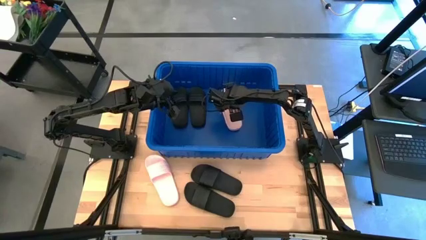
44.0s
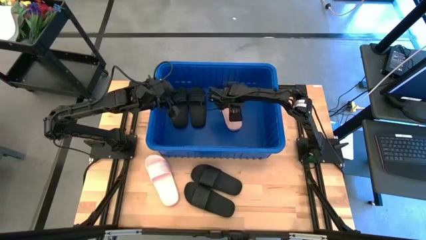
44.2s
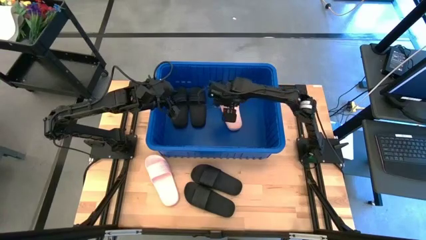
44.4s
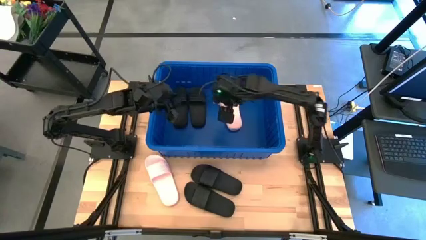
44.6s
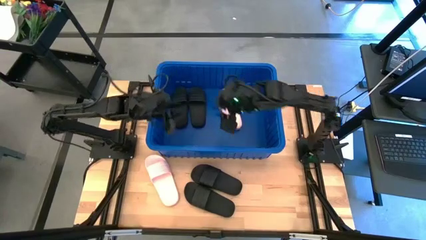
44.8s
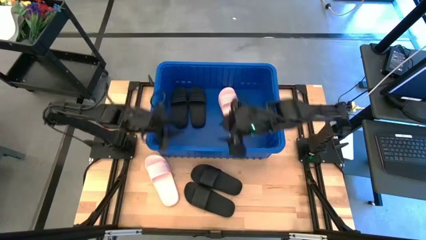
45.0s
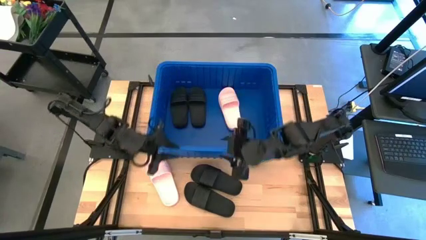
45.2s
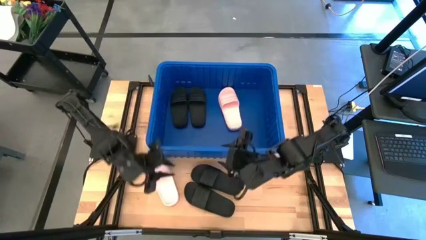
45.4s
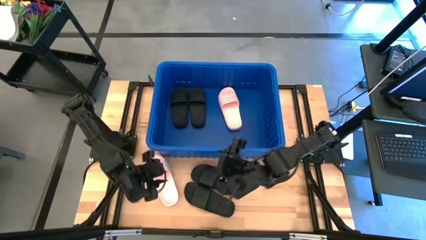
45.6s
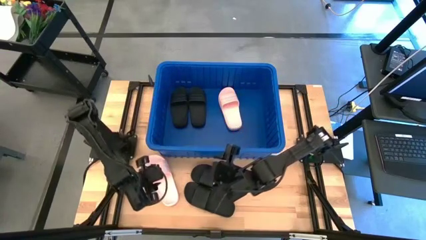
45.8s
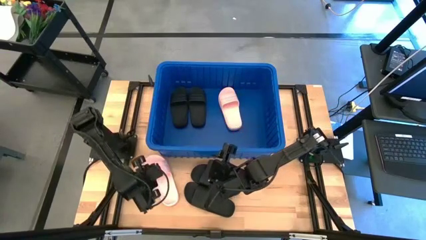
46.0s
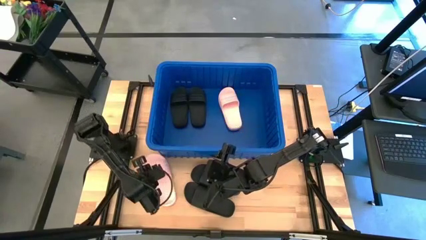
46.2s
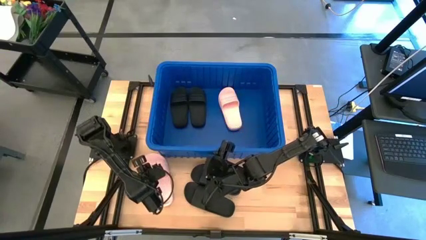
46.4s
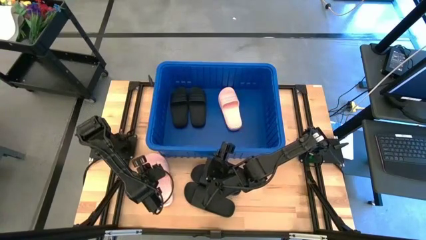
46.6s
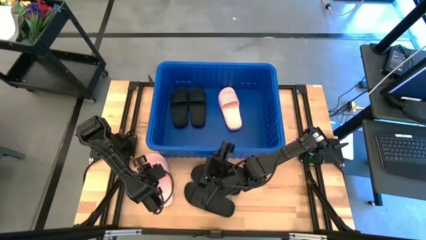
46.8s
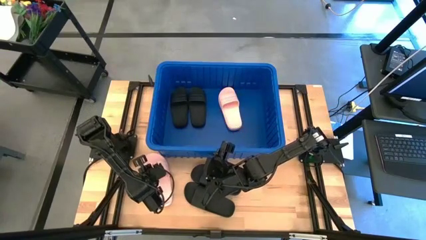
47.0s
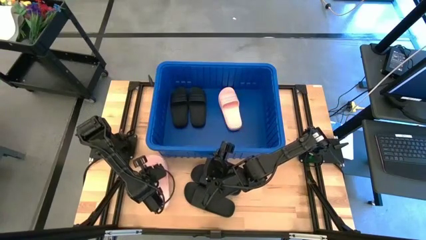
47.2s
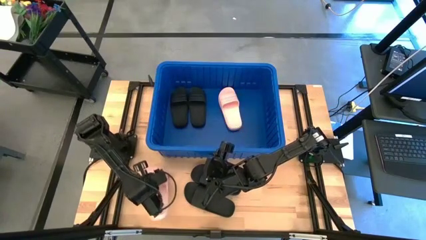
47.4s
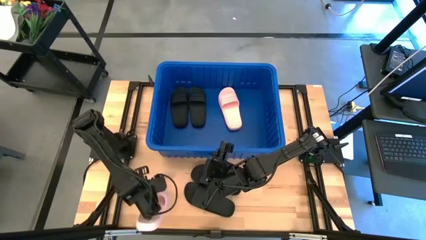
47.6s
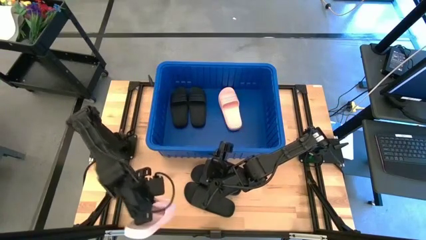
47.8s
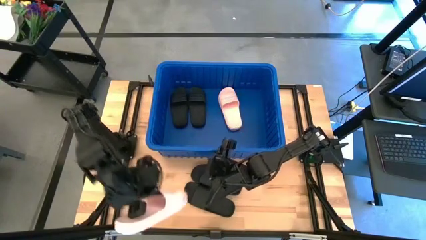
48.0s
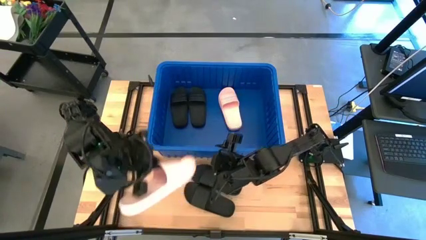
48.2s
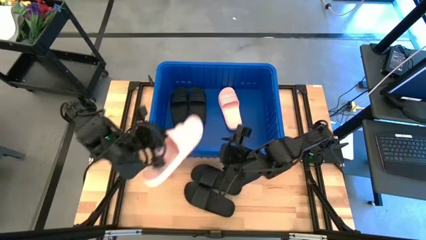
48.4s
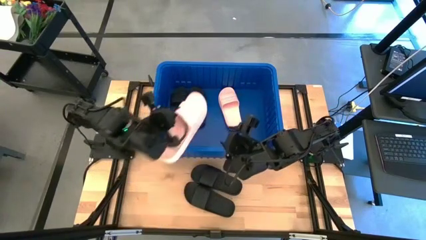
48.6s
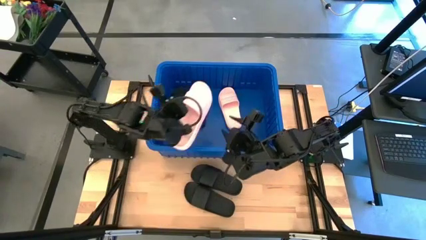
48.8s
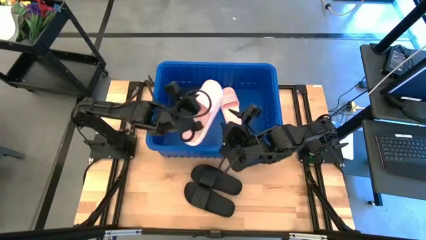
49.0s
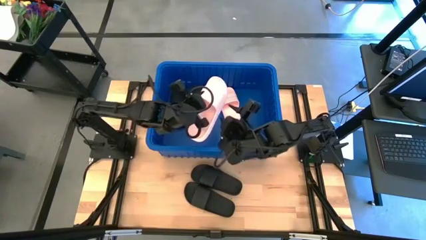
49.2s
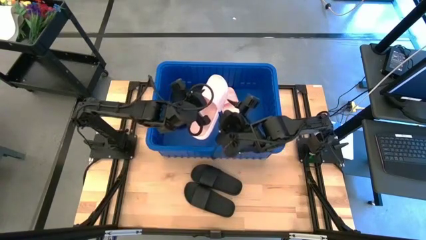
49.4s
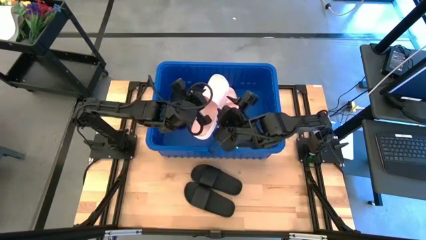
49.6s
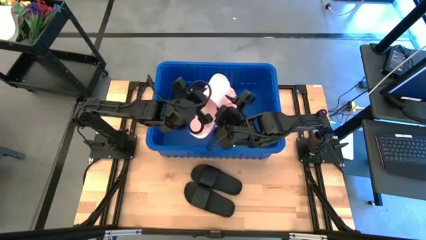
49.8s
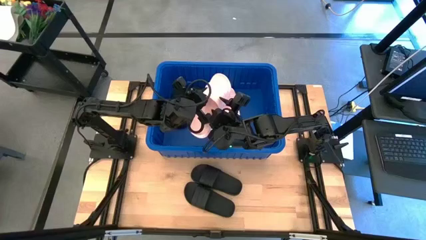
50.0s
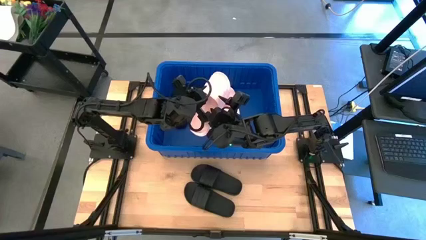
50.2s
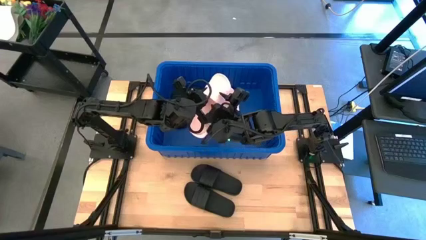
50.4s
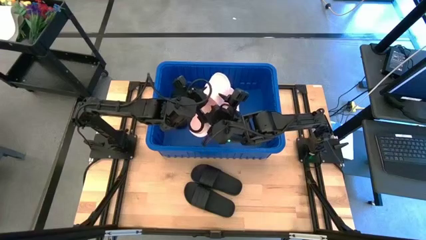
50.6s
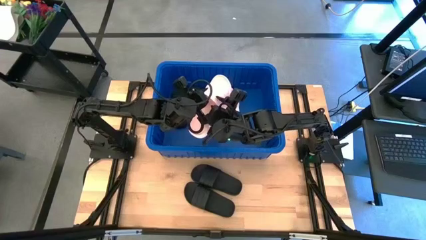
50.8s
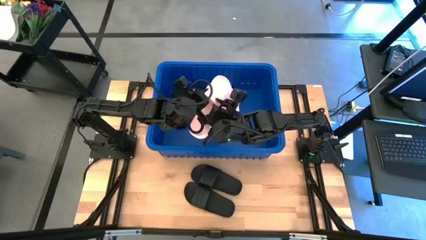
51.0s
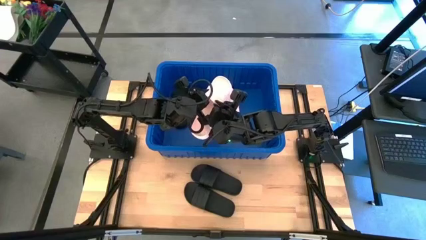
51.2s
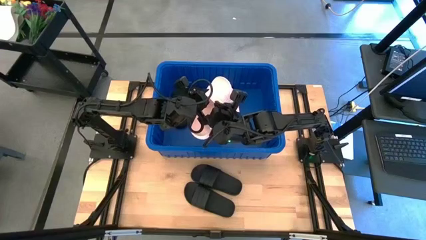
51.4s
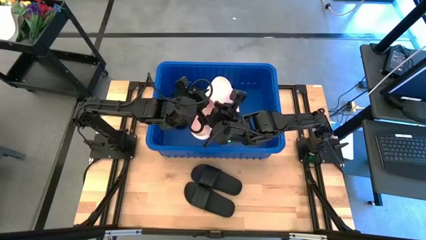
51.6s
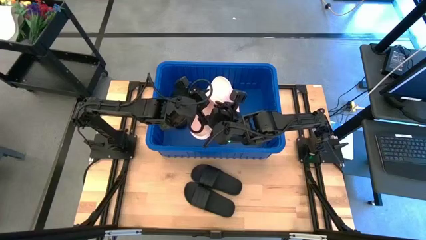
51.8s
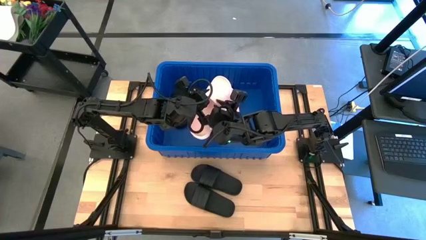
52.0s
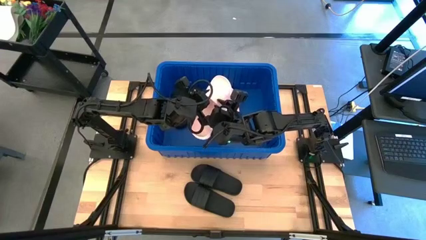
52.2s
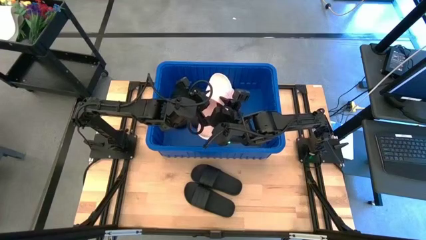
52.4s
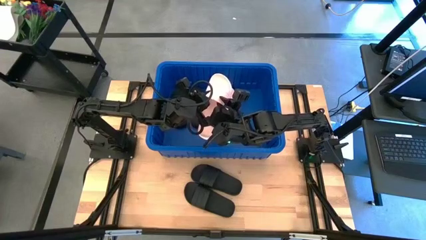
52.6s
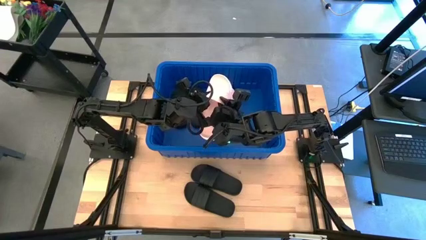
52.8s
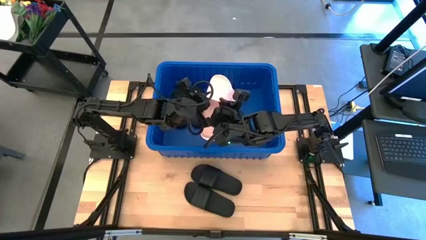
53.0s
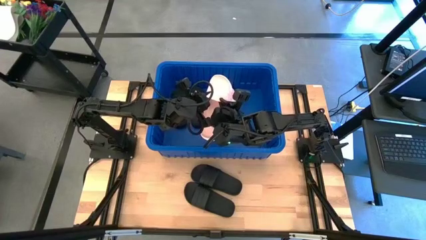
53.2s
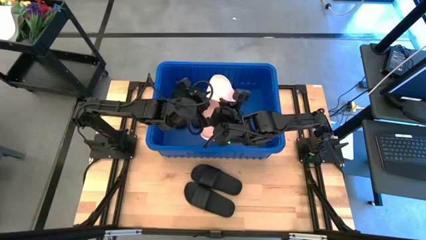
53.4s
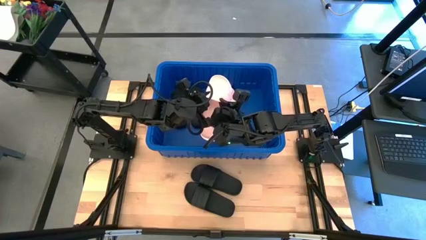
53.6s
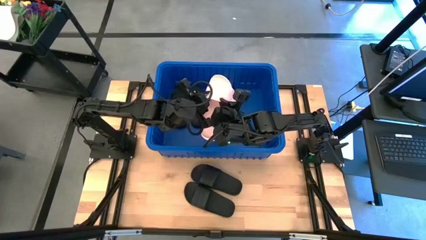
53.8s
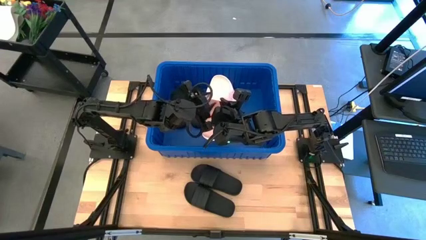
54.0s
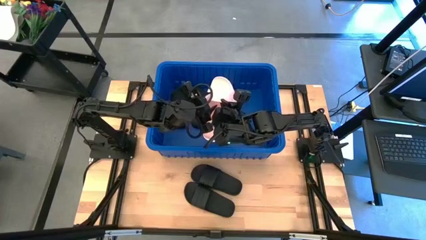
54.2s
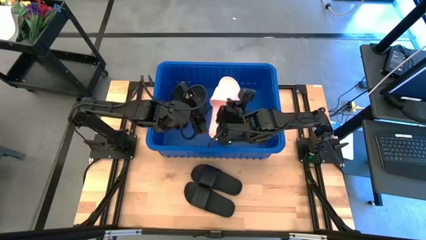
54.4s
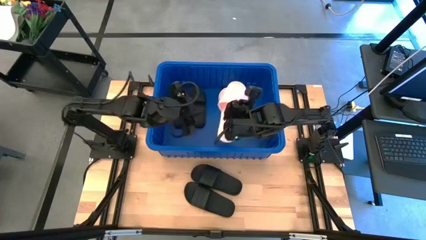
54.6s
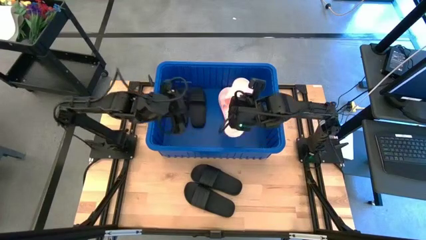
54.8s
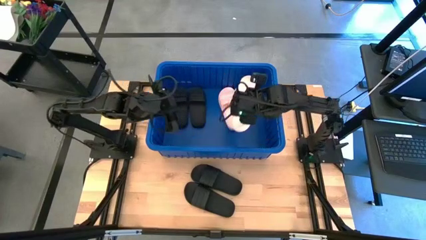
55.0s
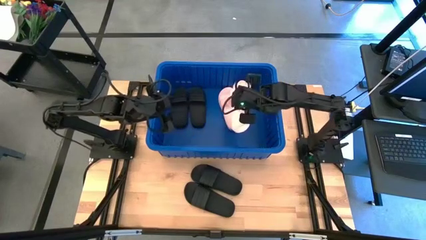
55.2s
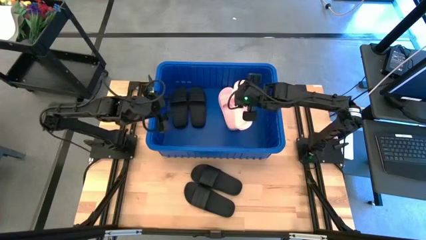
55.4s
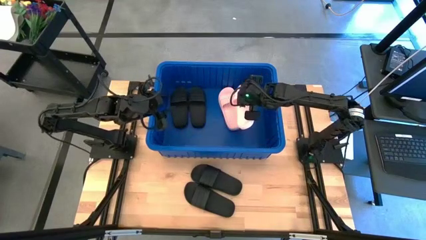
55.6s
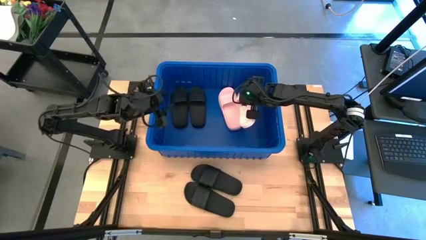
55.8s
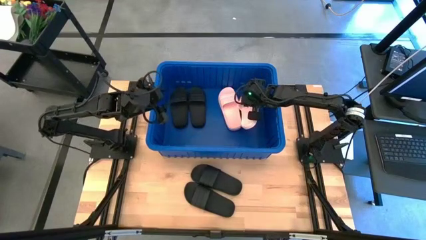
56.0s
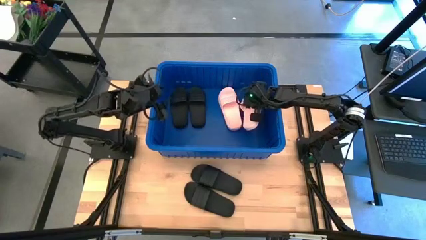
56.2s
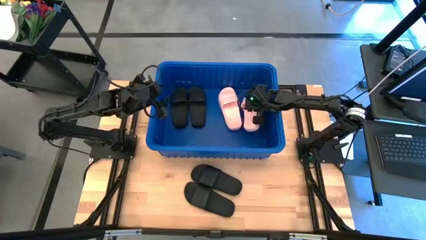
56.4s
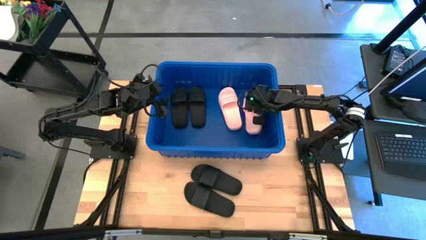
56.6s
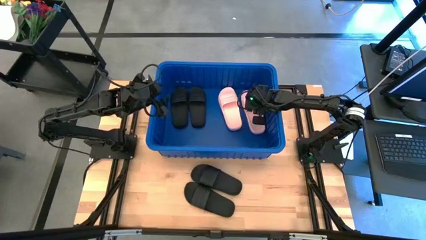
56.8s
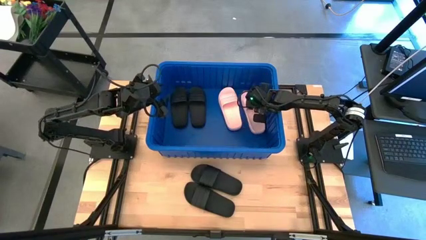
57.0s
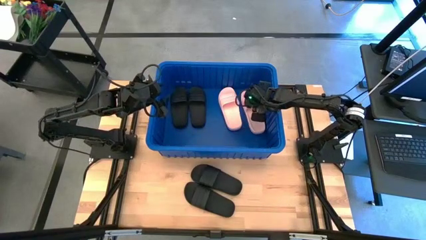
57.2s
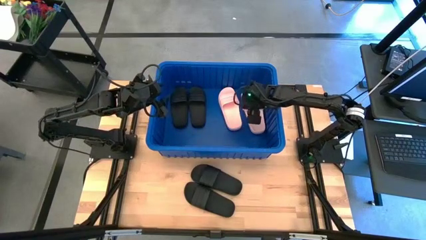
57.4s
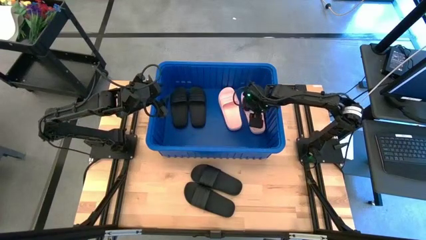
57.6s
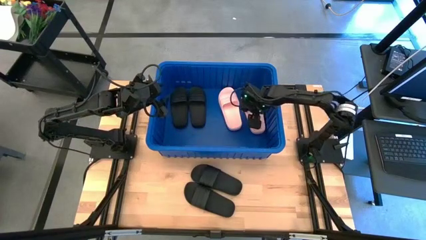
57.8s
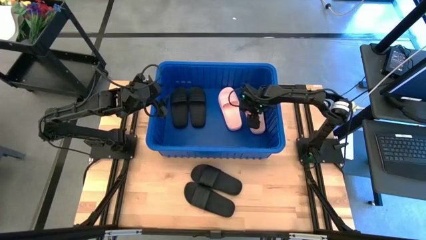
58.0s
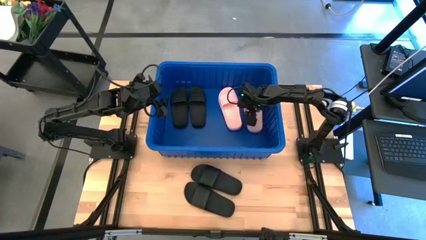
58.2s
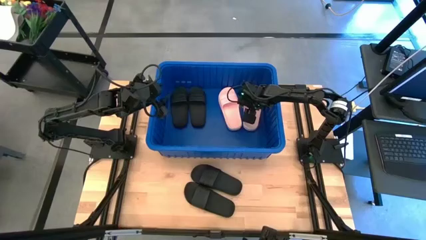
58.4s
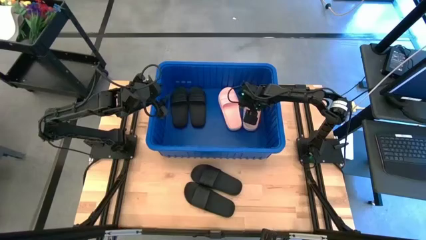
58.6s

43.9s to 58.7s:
Task: Pick and place slides into bin
Put the pink slide into the blue bin

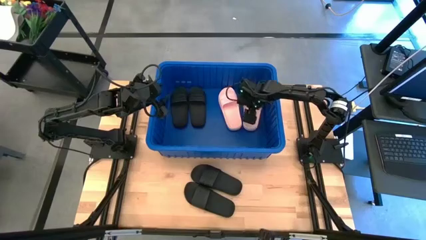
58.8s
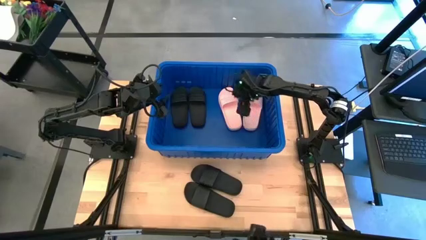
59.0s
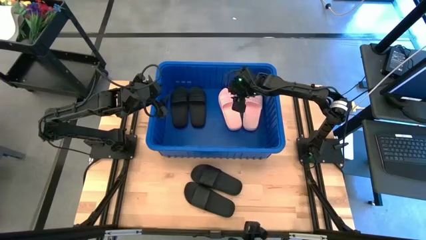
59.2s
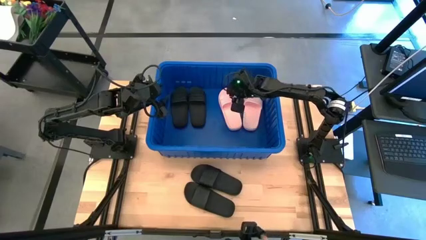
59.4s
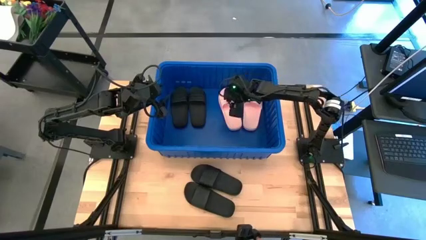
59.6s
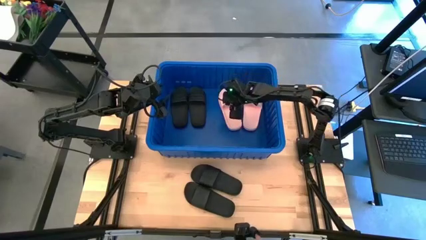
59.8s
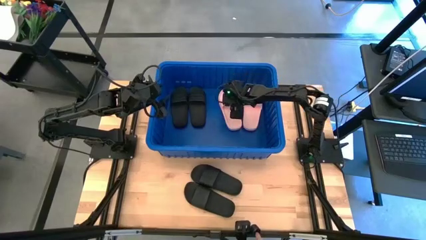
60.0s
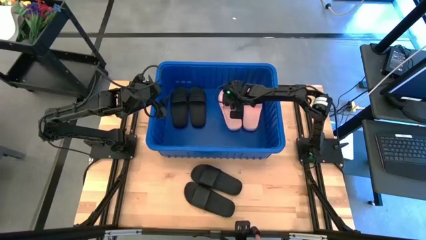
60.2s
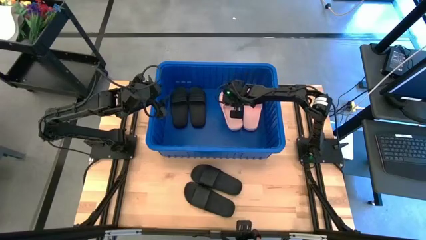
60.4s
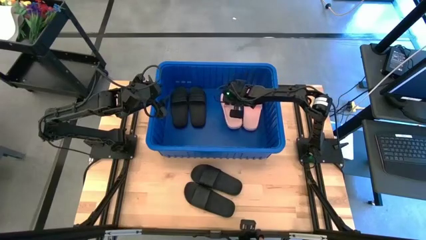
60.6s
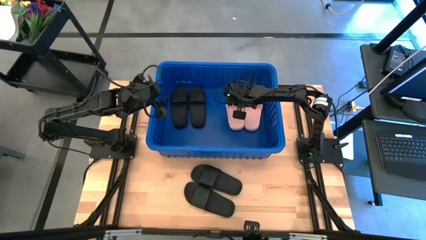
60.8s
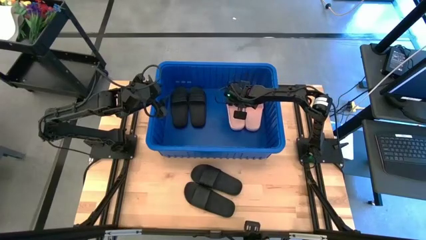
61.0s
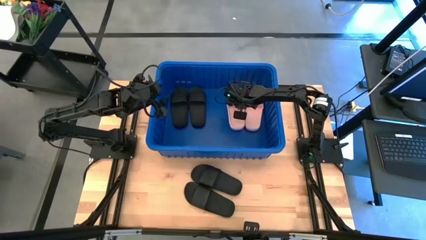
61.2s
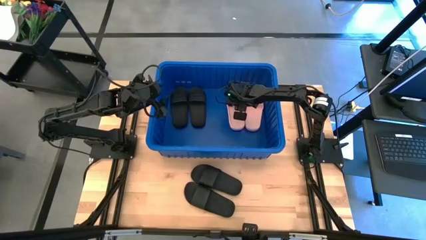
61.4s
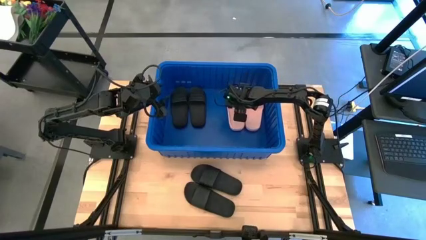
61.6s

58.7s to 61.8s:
Adjust the pink slide into the blue bin
